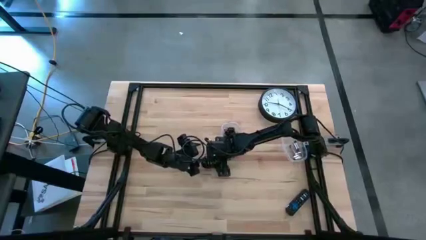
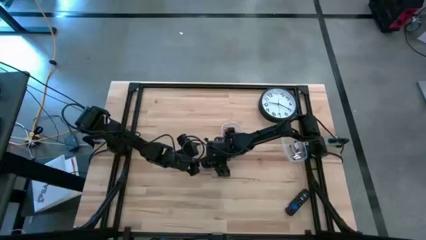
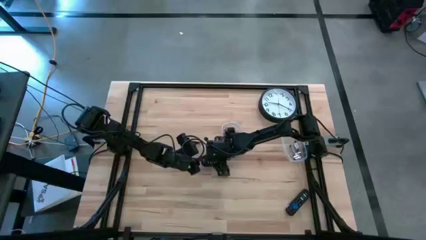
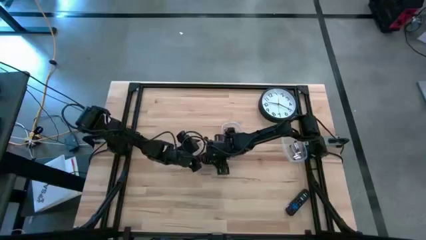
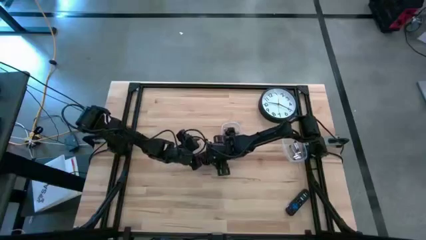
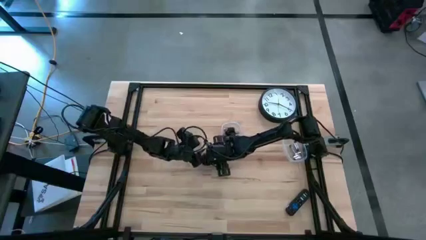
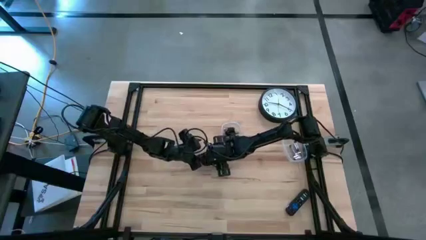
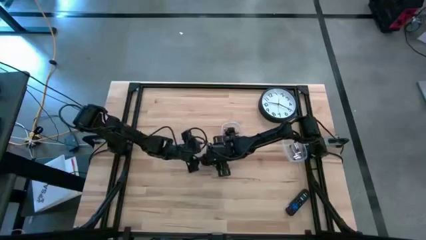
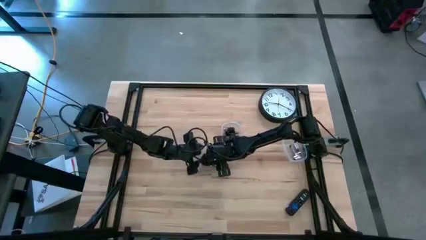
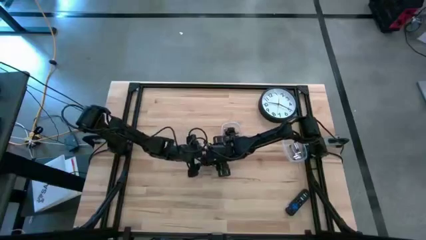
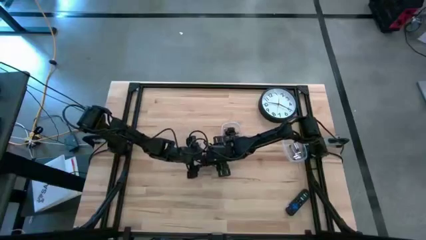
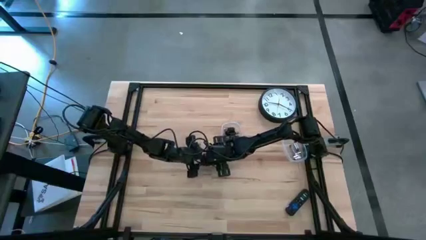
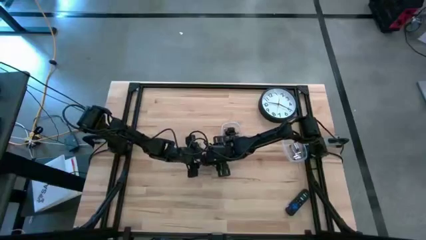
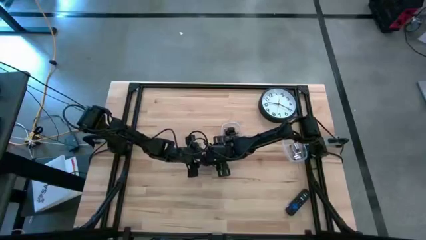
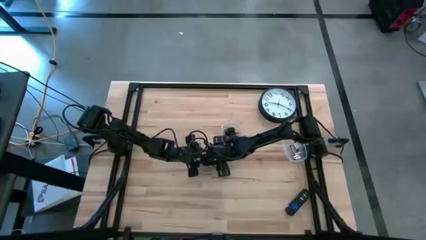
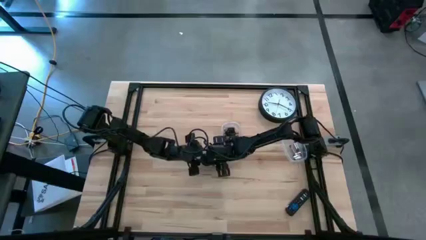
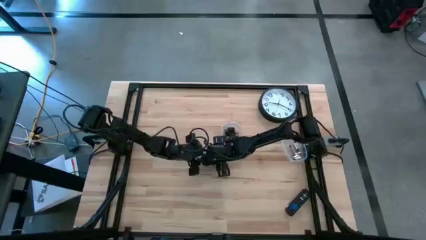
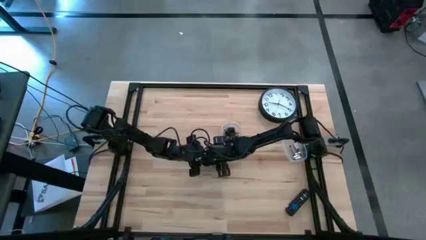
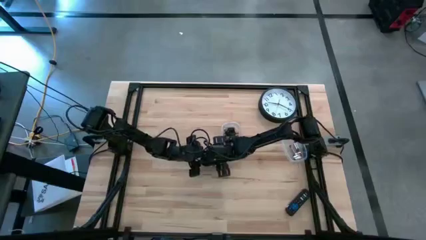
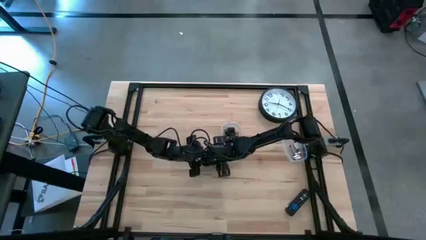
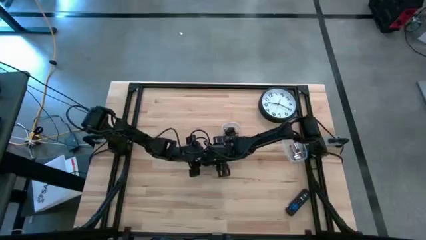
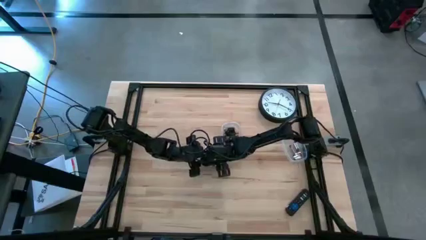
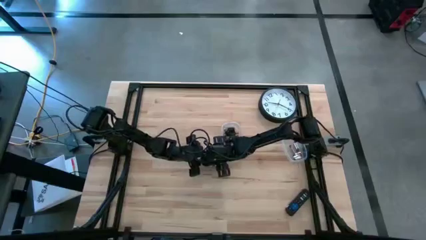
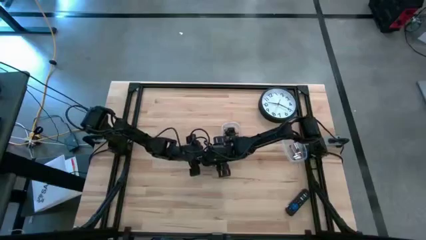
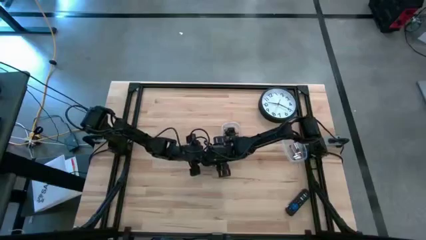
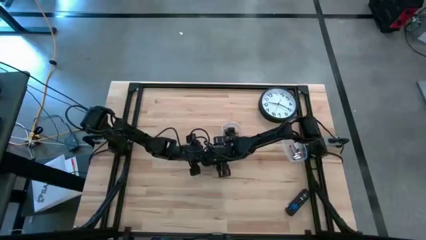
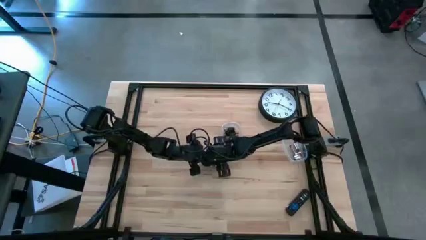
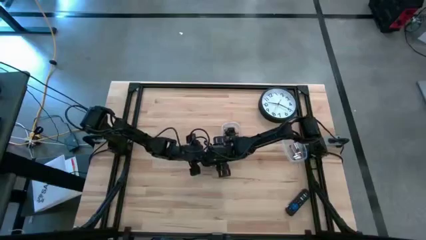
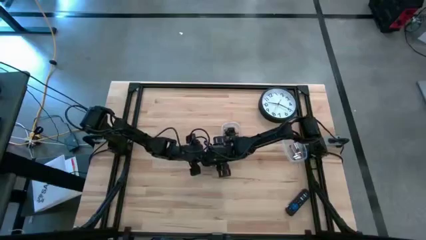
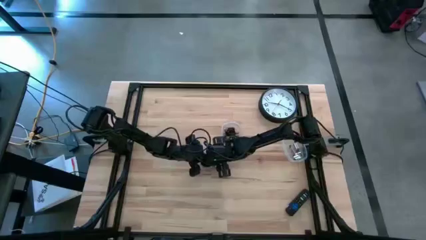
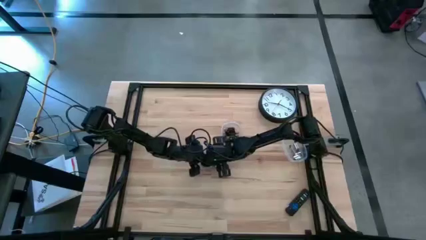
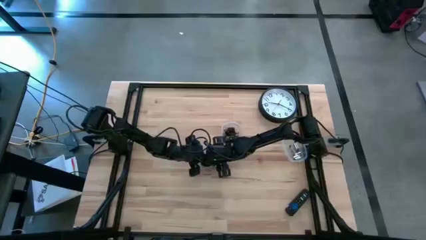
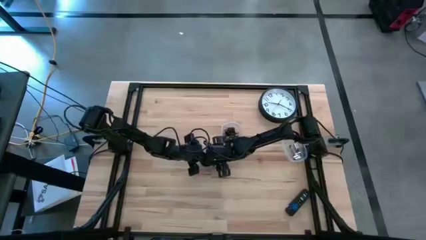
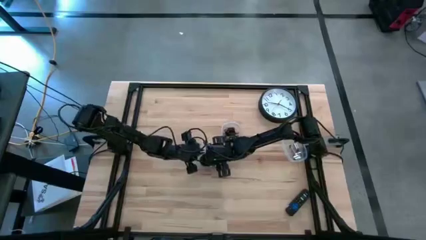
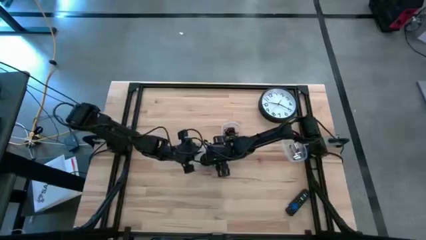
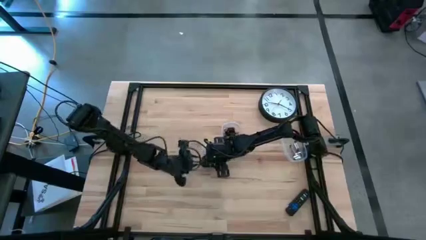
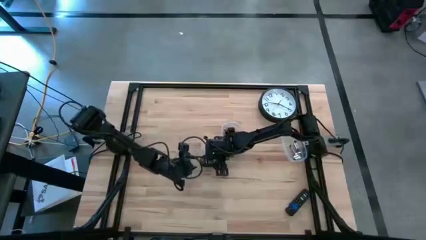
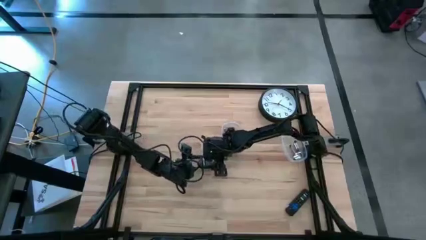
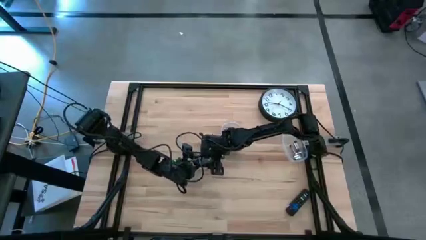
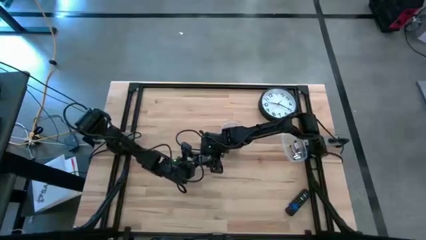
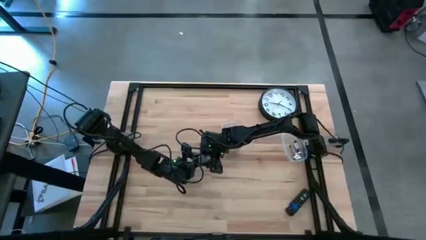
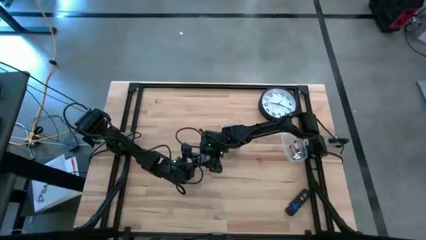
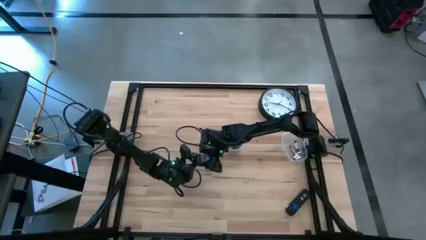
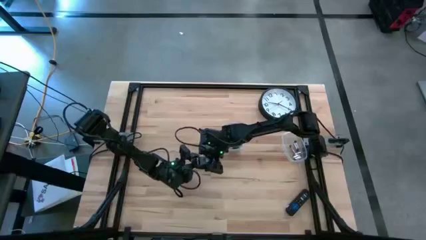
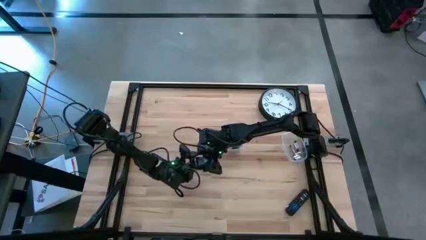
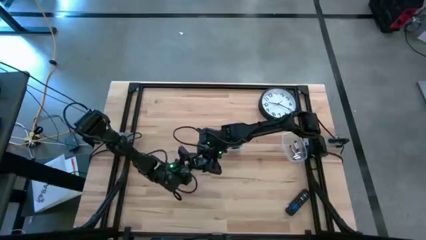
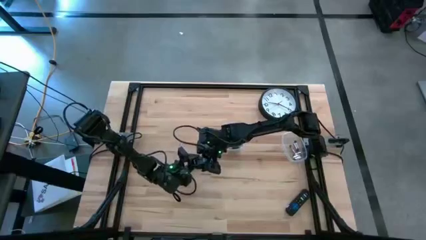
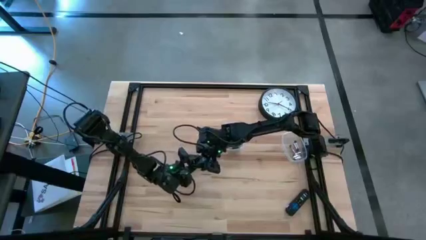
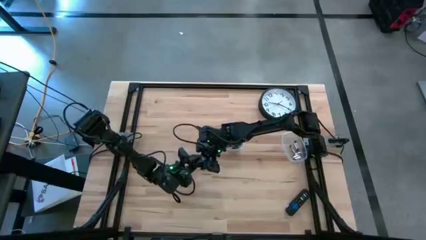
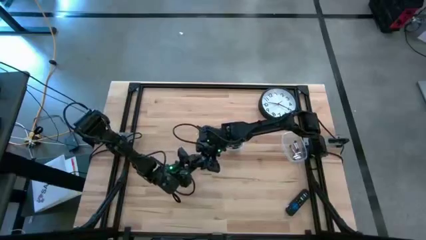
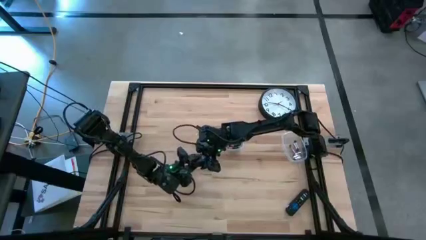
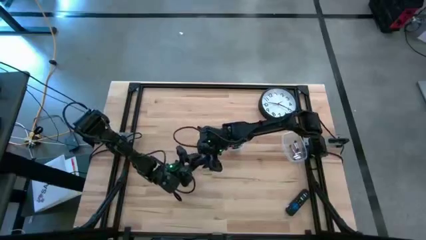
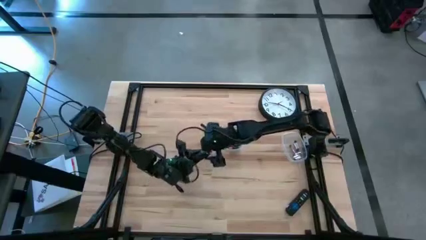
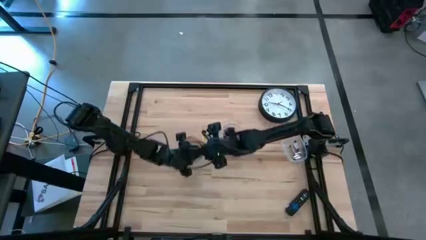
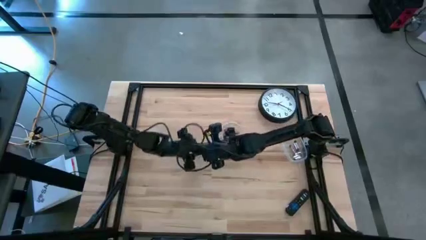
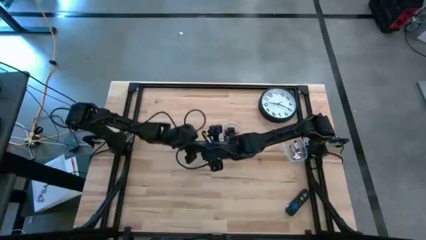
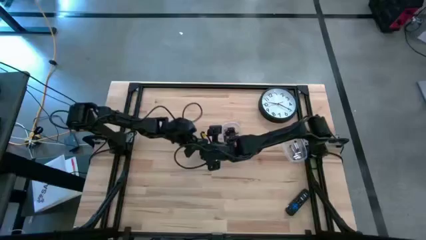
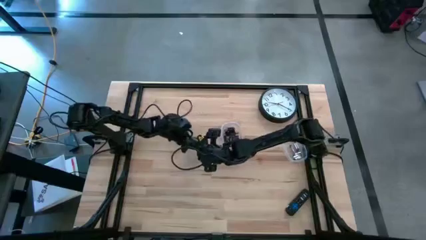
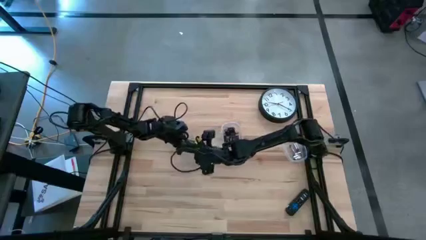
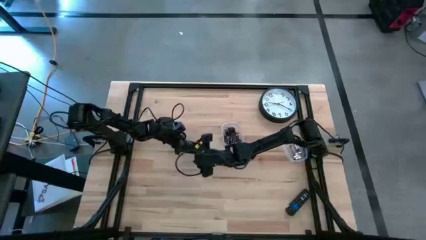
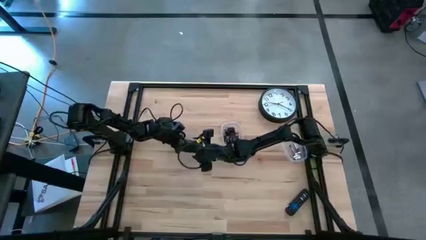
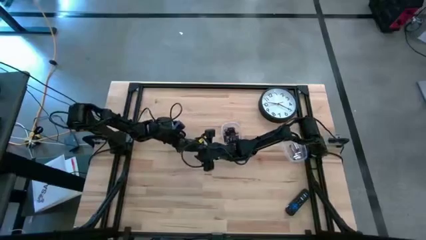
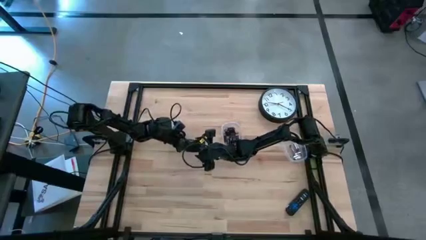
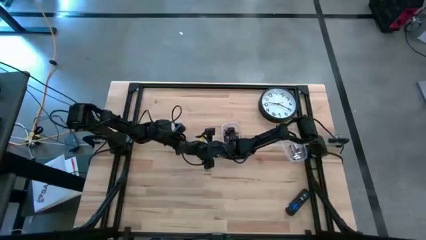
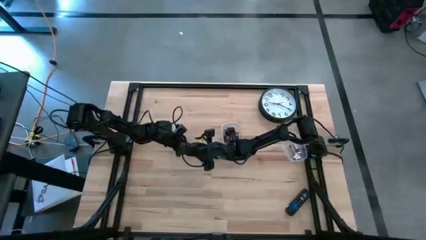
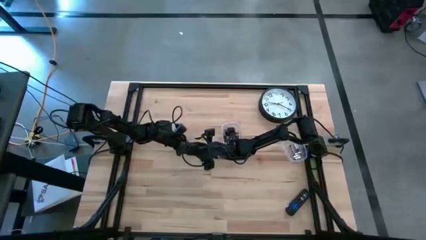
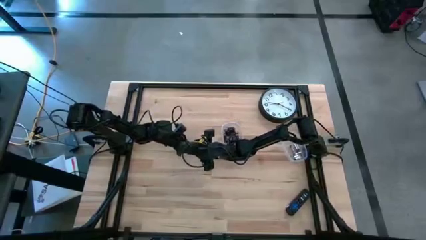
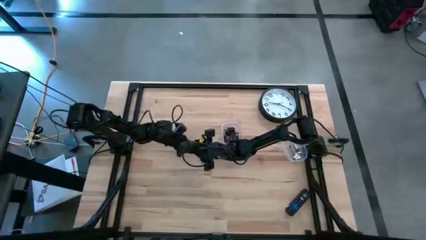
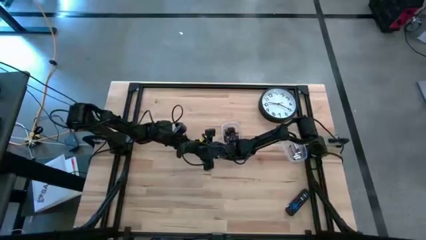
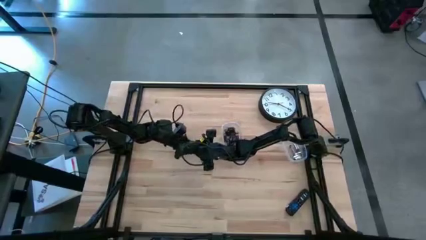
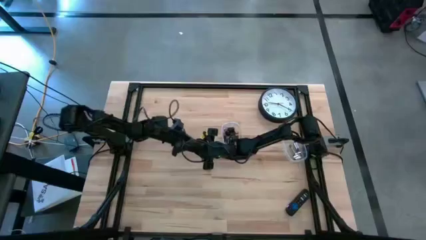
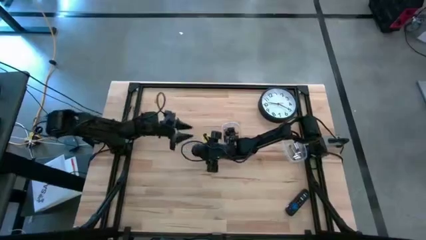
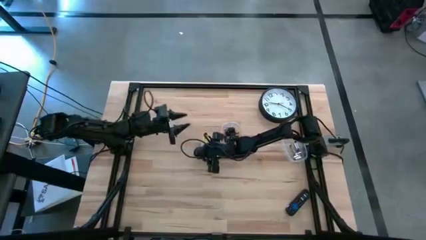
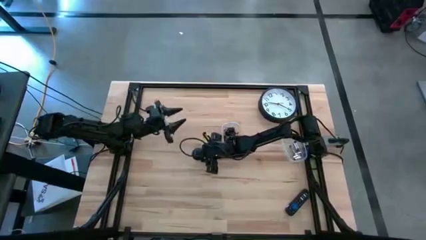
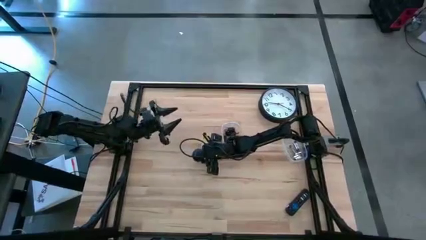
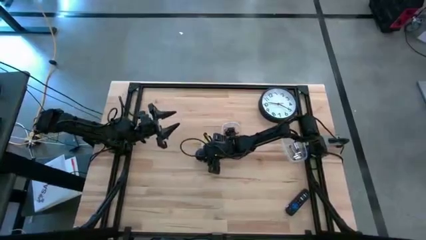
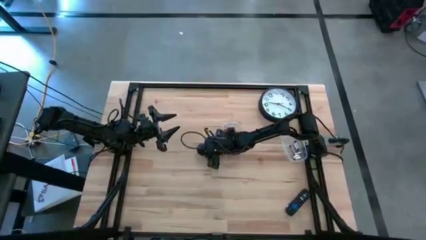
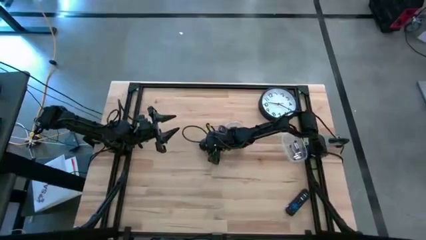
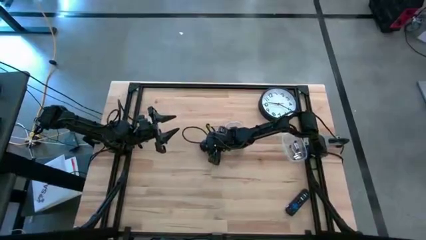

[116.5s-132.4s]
Task: Insert battery
Insert the brown battery into the mouse's battery compartment
